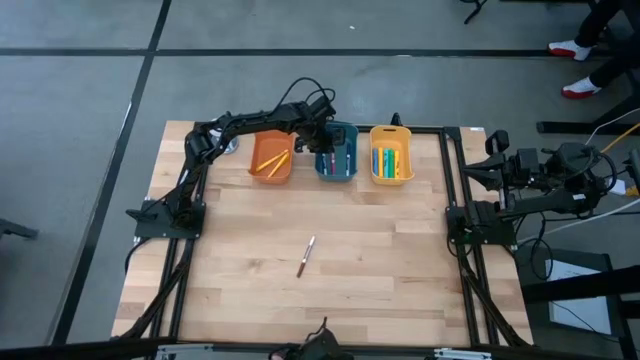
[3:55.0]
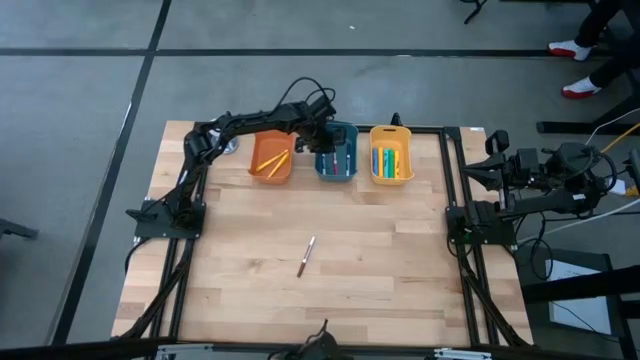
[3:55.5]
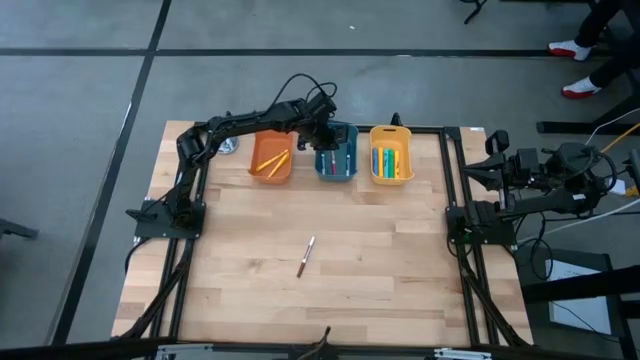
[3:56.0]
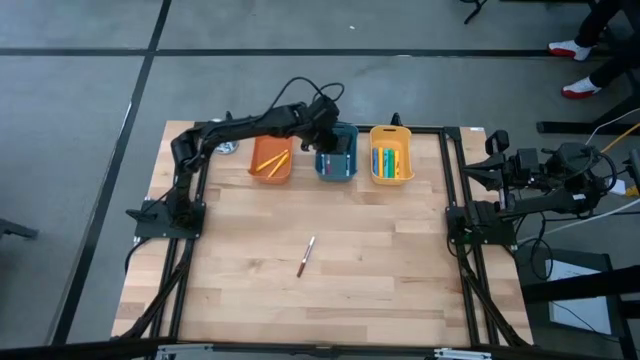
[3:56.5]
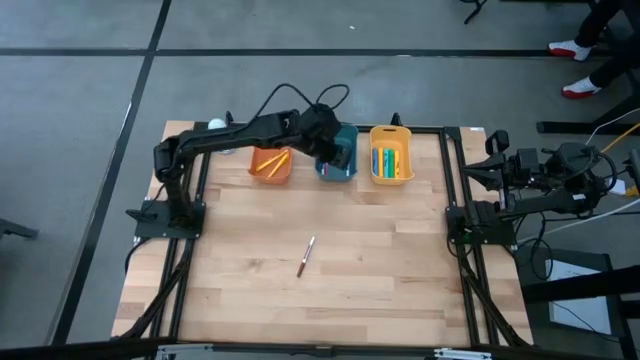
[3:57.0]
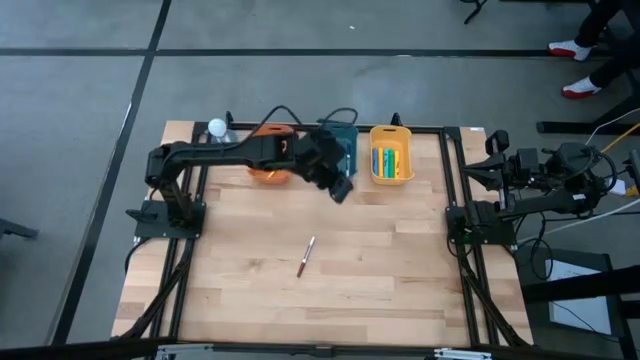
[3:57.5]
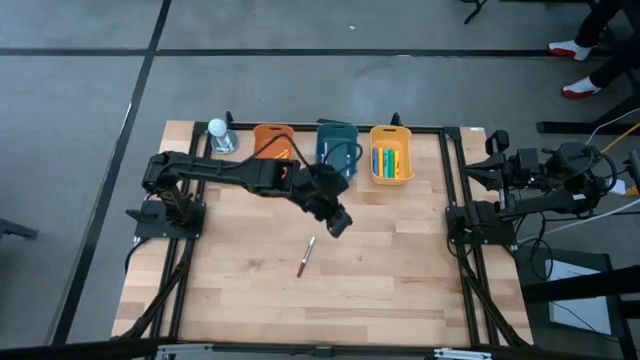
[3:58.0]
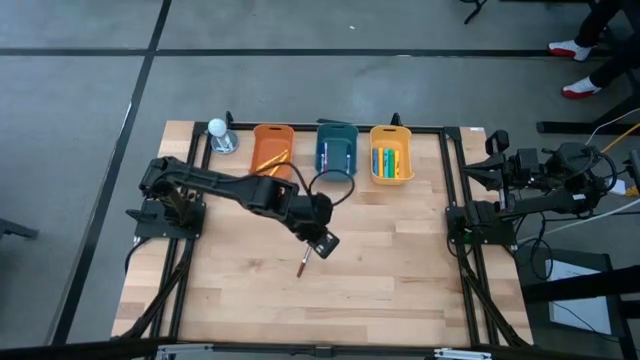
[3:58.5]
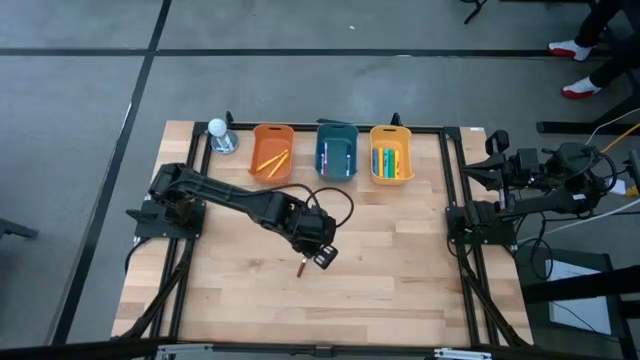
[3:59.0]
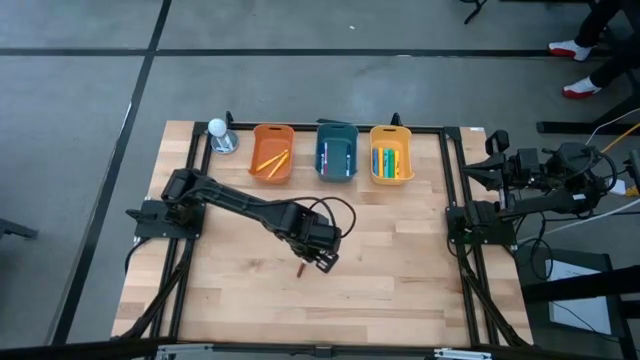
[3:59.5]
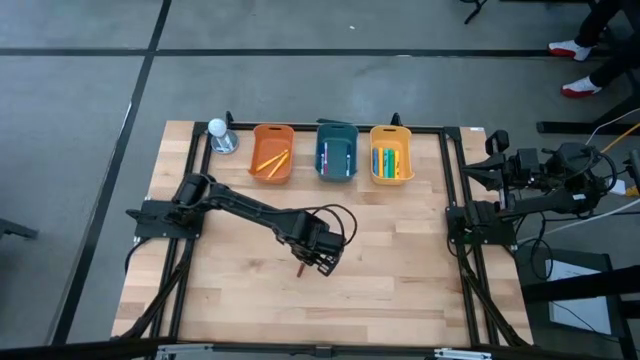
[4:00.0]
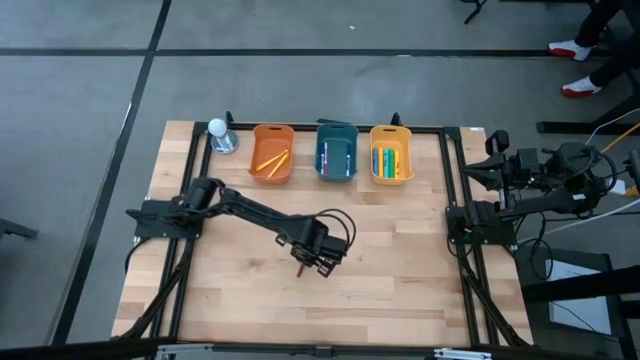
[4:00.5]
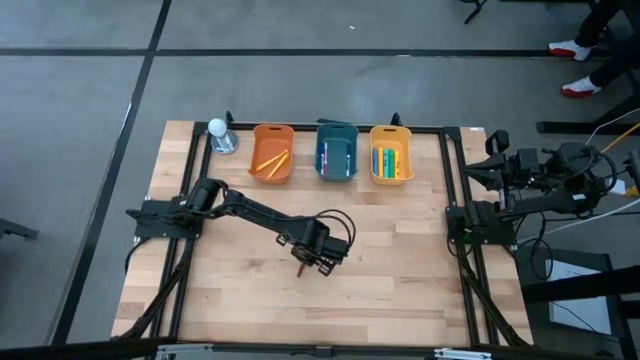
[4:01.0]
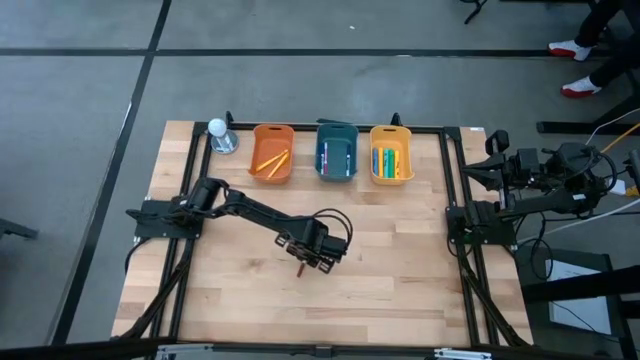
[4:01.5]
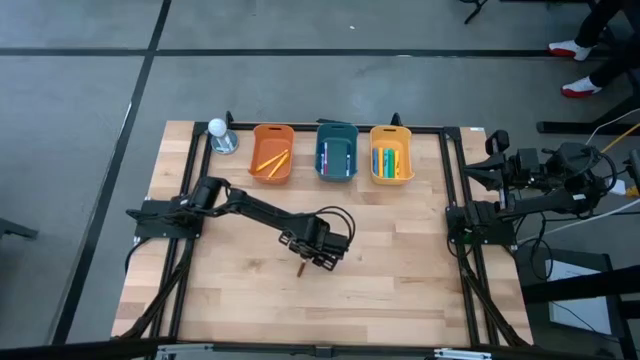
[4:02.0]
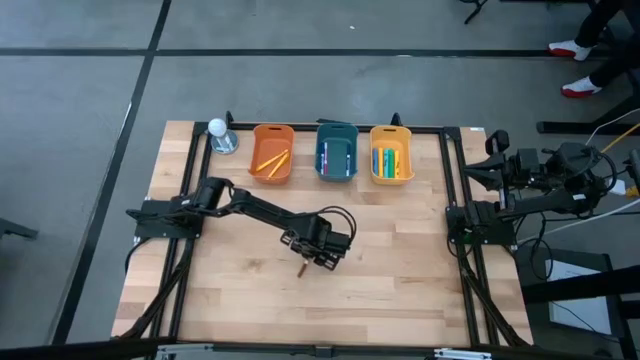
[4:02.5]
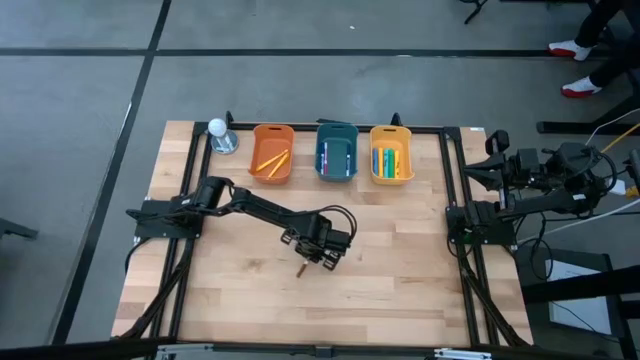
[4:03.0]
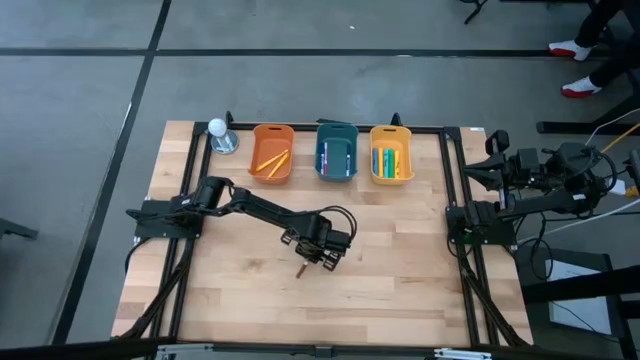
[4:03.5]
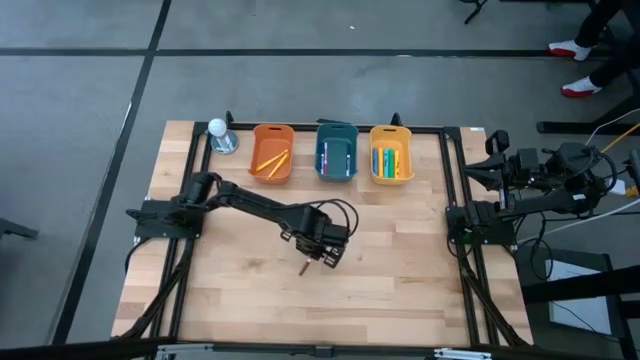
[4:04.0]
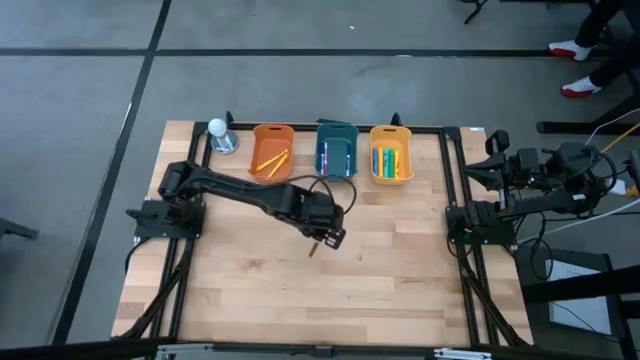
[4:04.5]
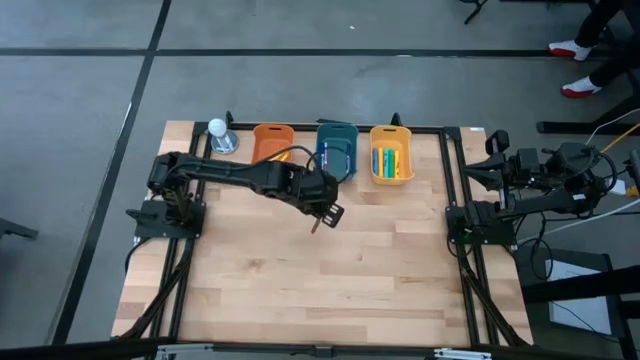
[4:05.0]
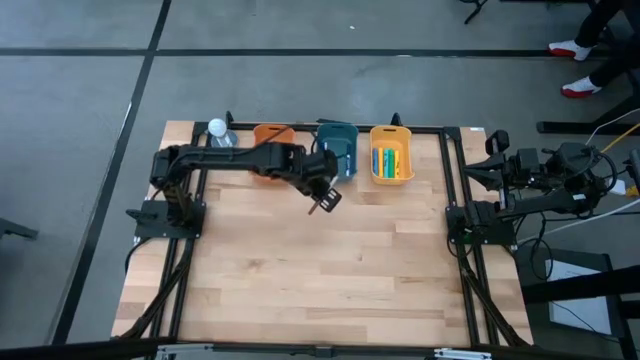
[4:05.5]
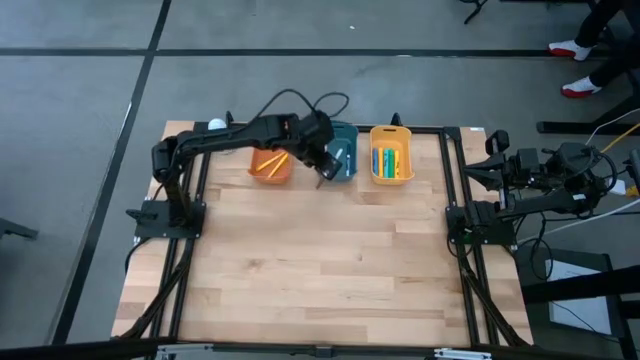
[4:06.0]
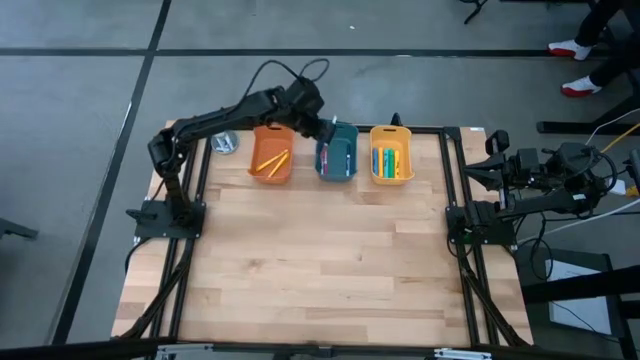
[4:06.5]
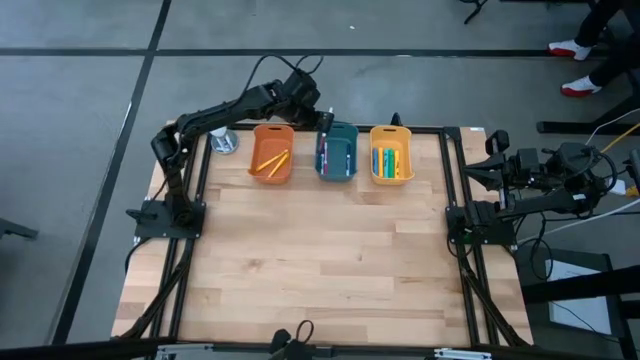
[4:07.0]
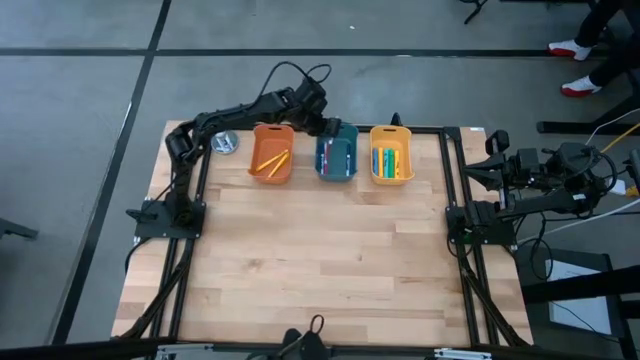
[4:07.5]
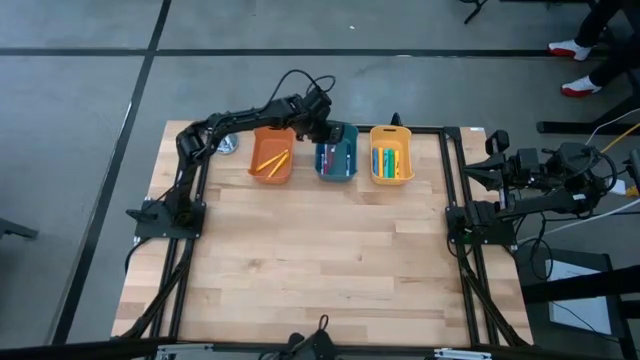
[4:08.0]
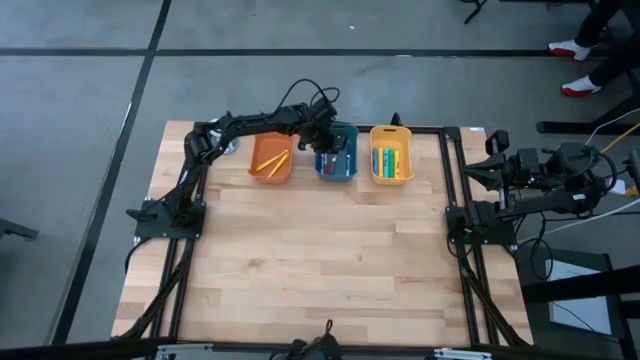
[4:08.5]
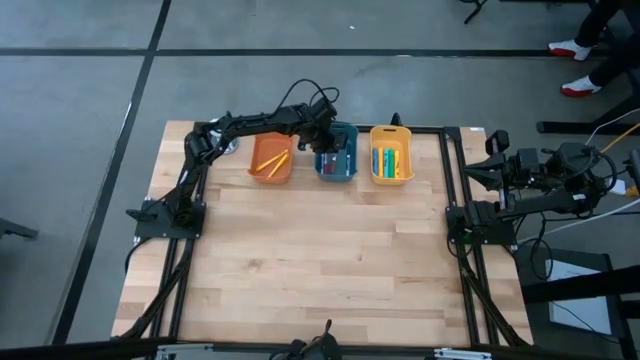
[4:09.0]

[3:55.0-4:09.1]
Task: Pick & Place Markers
Put the brown marker pen into the blue bin

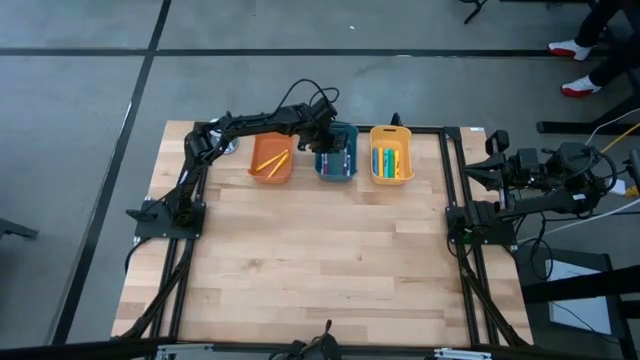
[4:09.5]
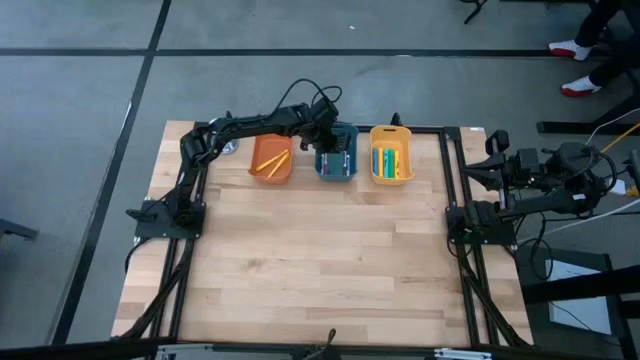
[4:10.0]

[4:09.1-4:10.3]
Return to Home Position

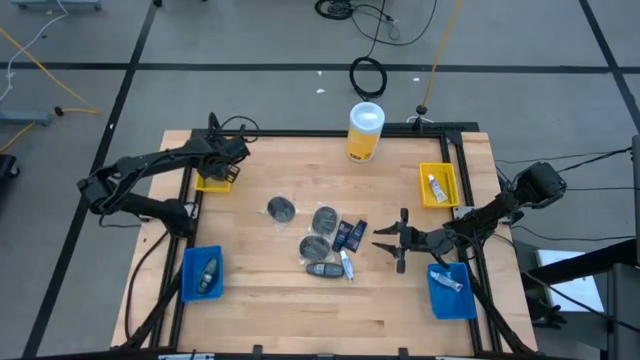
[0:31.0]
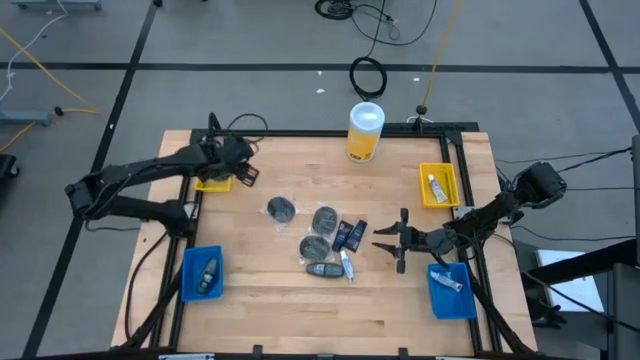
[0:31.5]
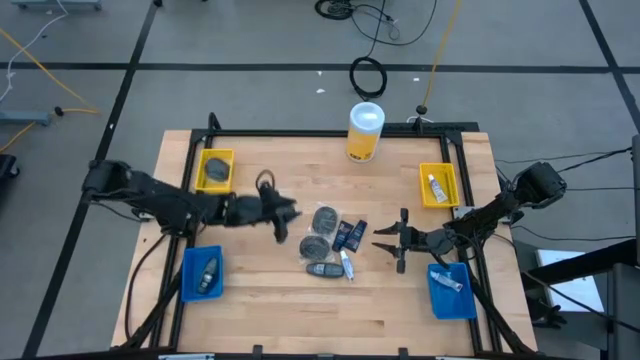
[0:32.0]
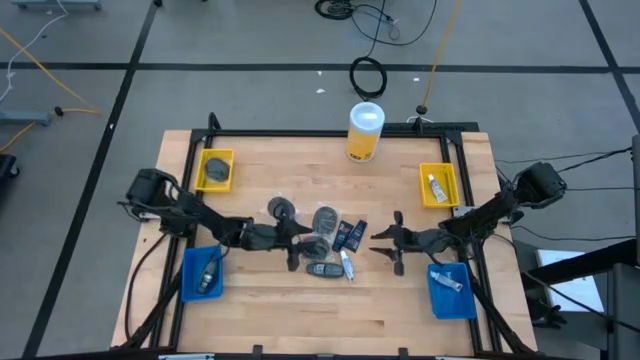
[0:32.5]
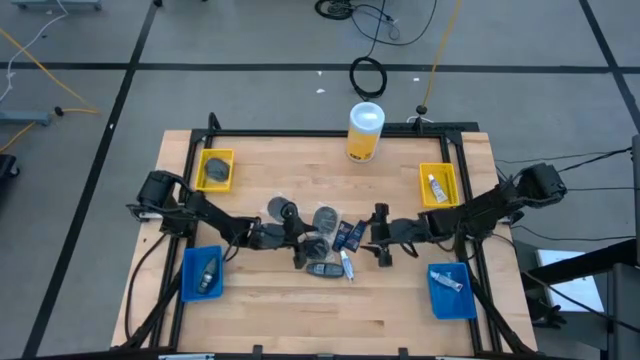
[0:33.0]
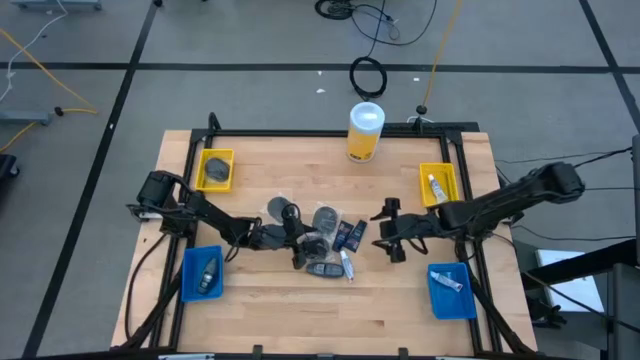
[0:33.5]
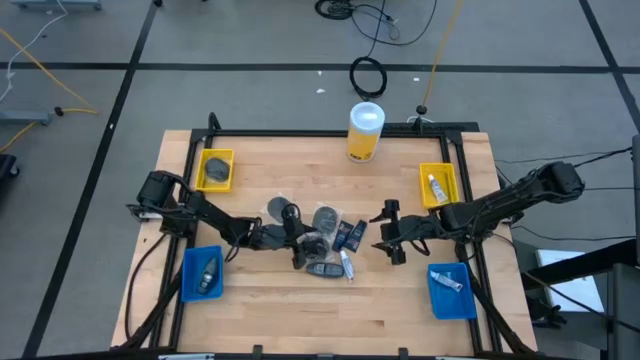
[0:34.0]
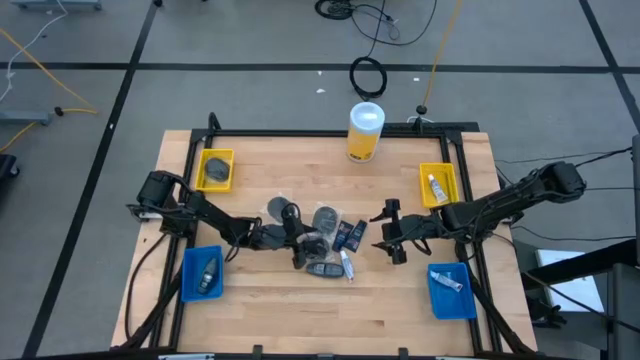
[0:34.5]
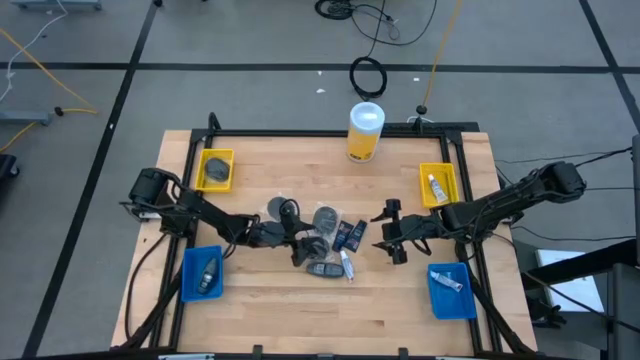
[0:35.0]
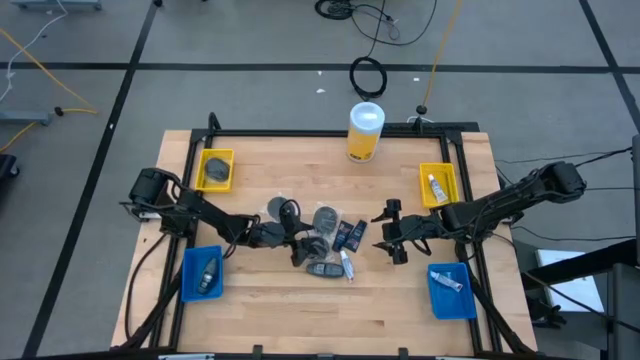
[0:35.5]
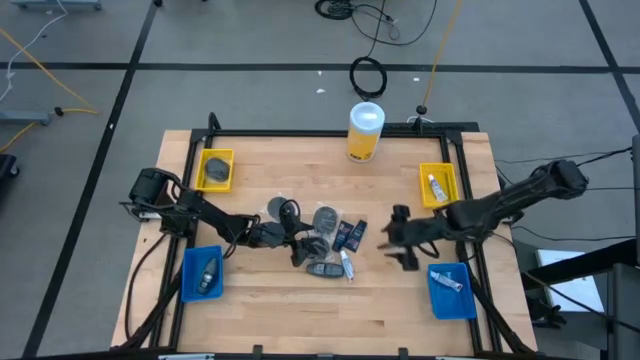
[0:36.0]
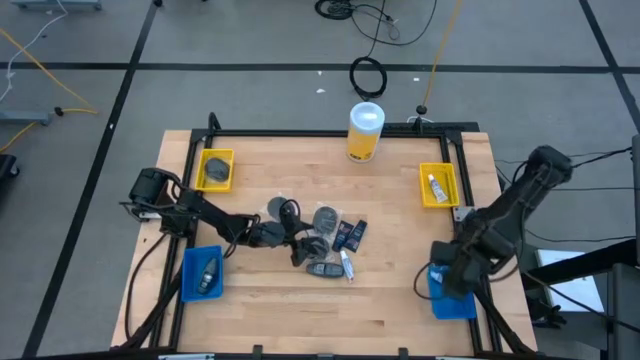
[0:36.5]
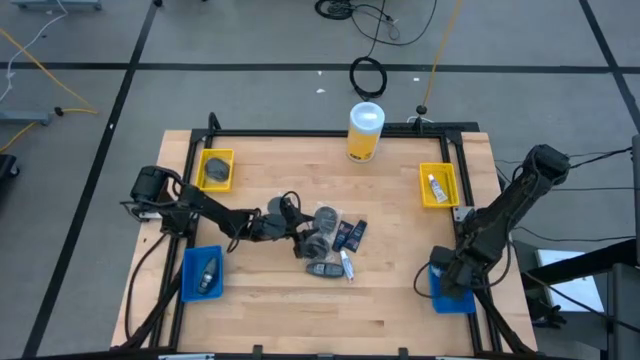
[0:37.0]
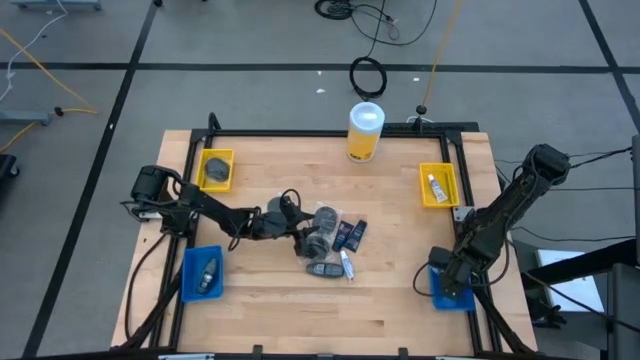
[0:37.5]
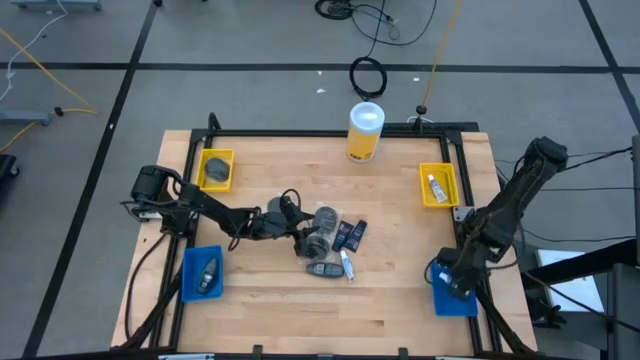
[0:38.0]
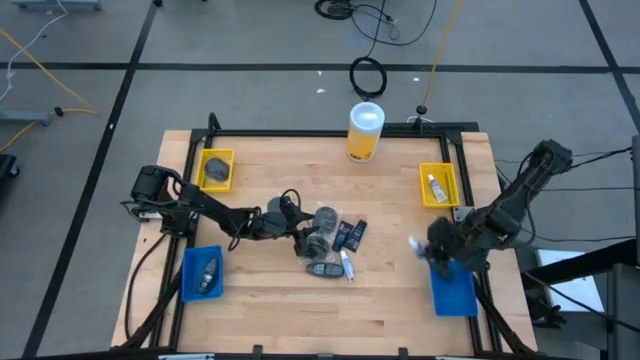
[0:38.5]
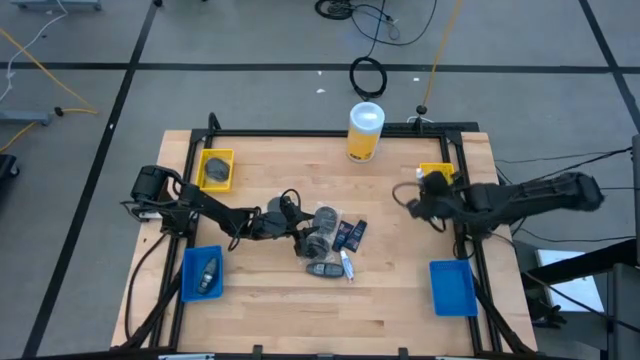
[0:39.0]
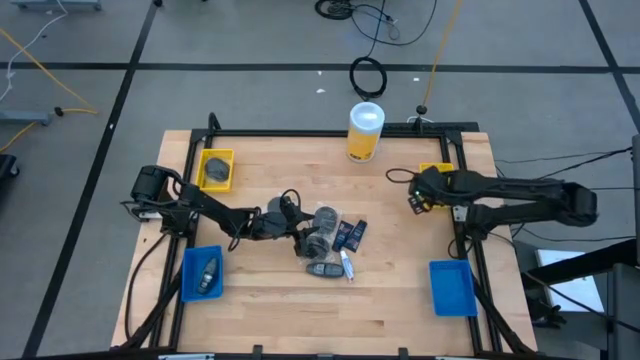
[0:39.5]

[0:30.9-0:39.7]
Task: Pick & Place Travel size toiletries
Put the white toothpaste into the right yellow bin
